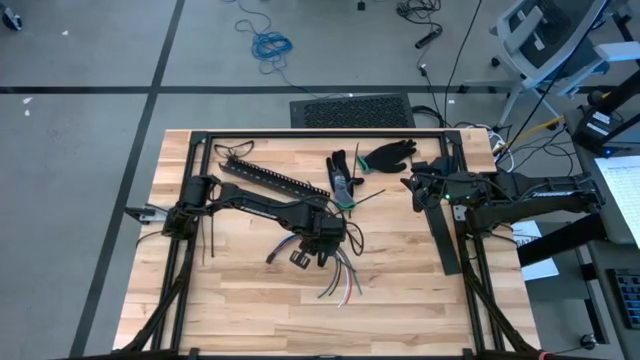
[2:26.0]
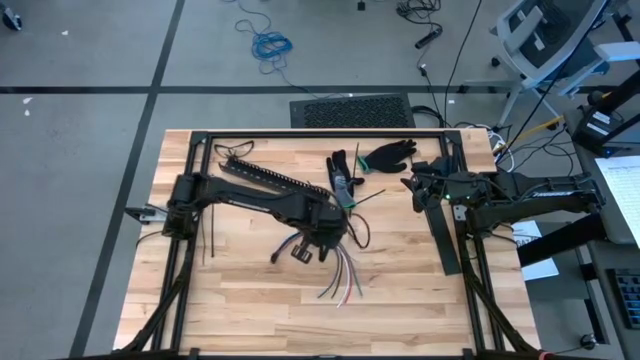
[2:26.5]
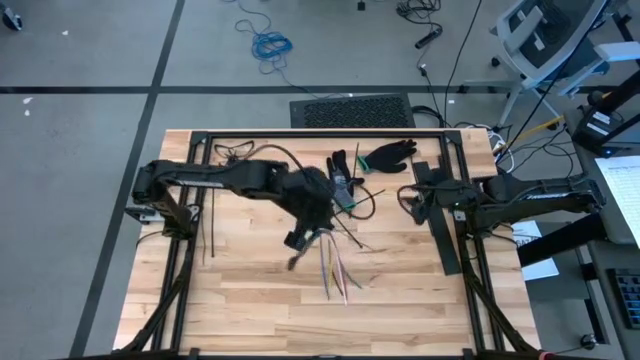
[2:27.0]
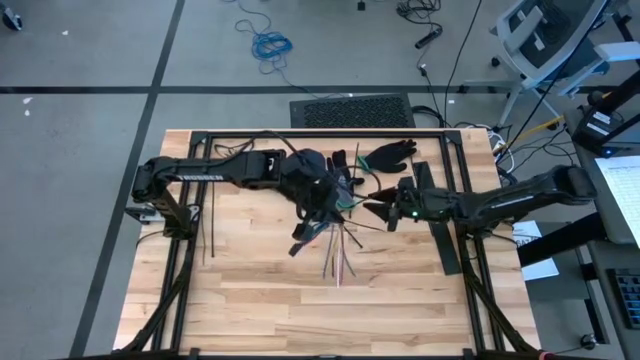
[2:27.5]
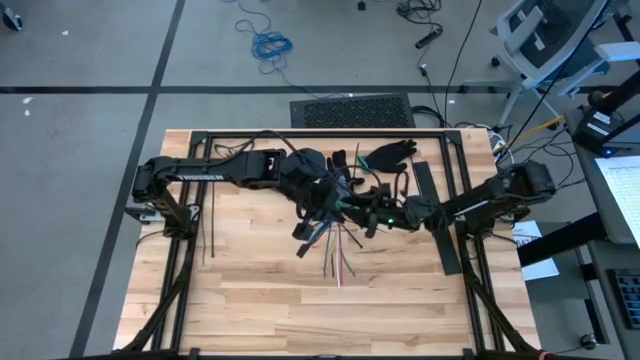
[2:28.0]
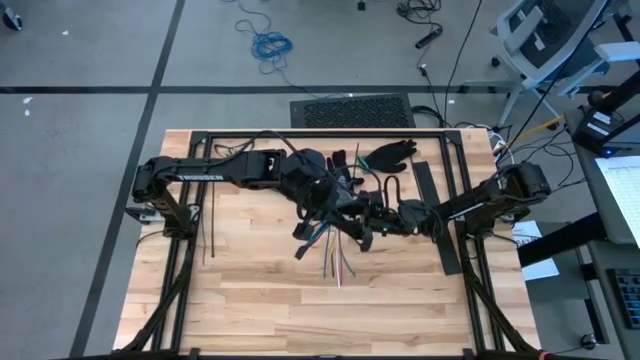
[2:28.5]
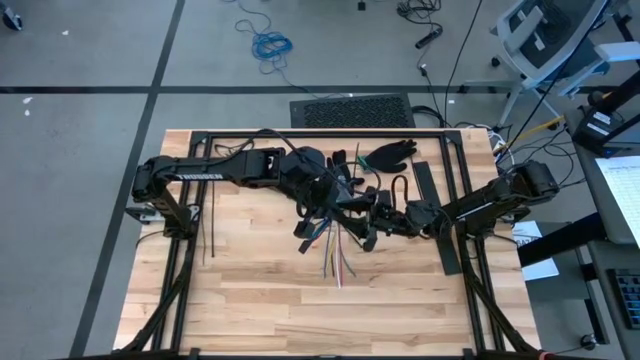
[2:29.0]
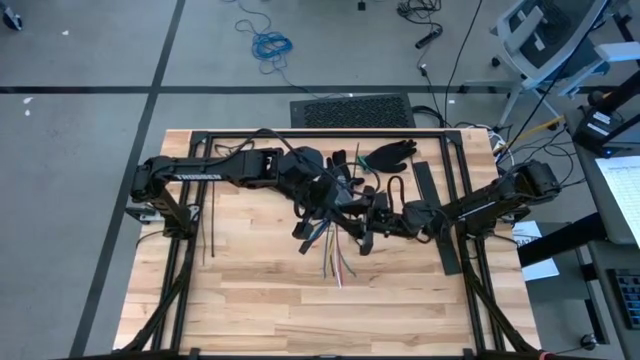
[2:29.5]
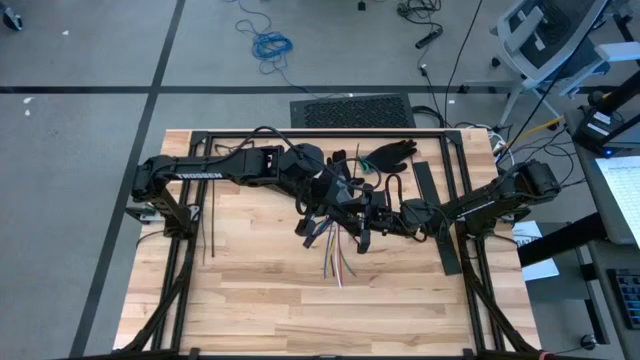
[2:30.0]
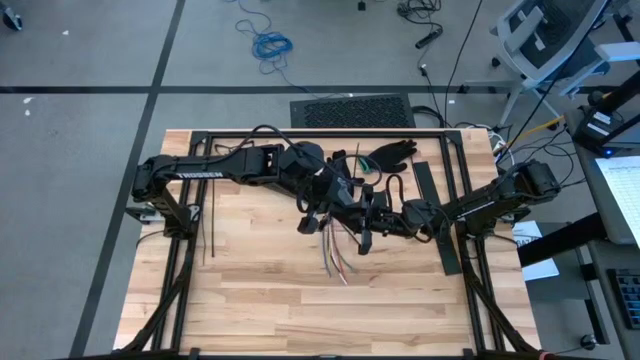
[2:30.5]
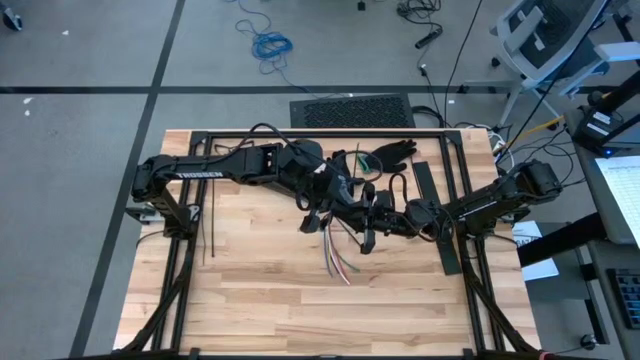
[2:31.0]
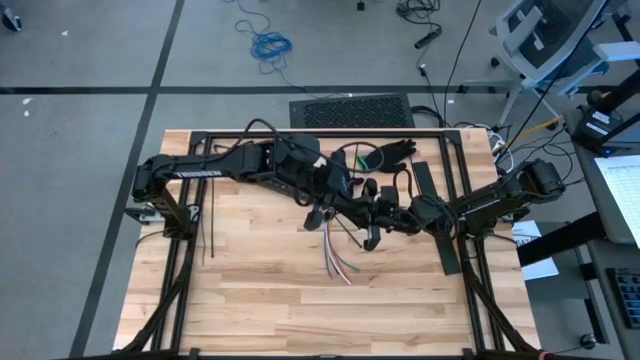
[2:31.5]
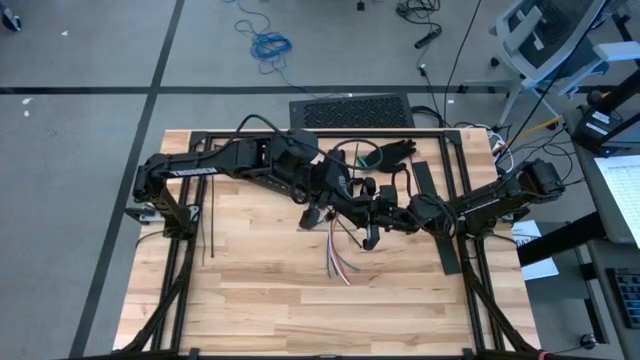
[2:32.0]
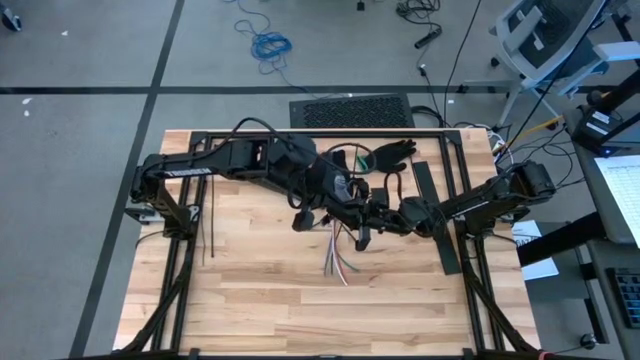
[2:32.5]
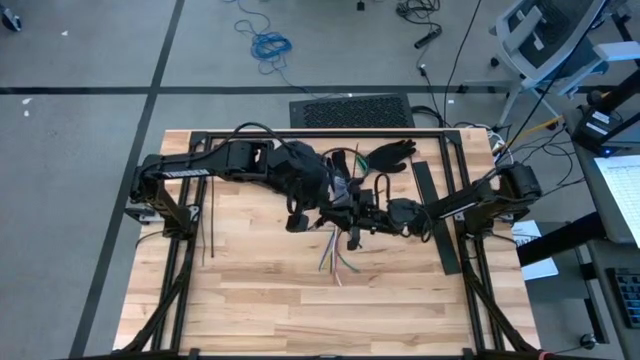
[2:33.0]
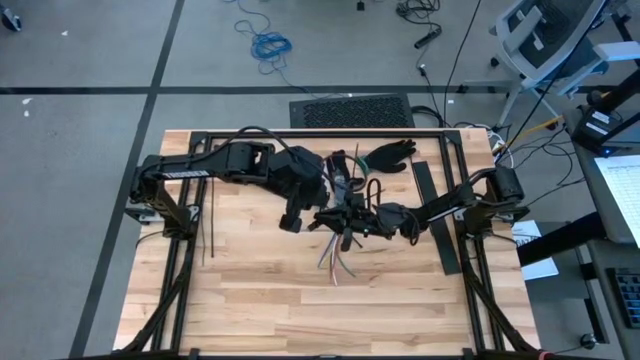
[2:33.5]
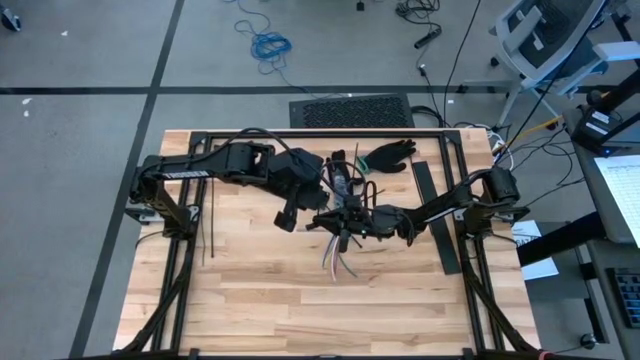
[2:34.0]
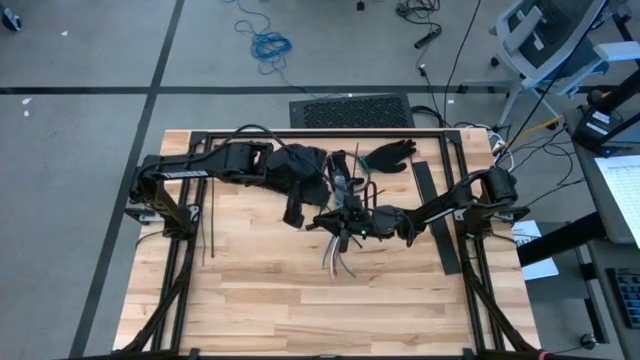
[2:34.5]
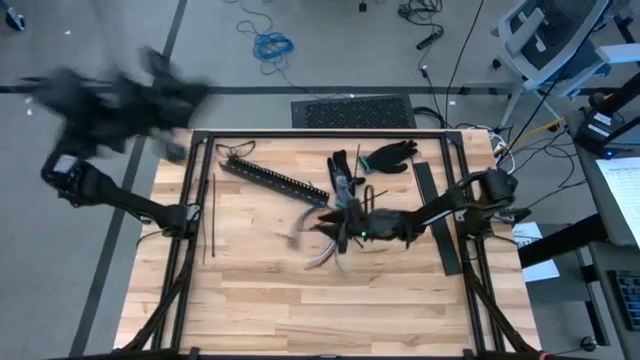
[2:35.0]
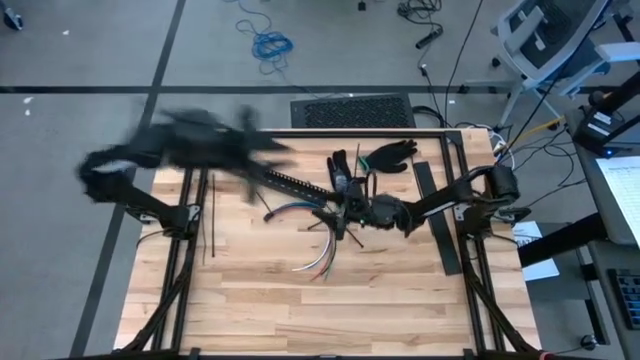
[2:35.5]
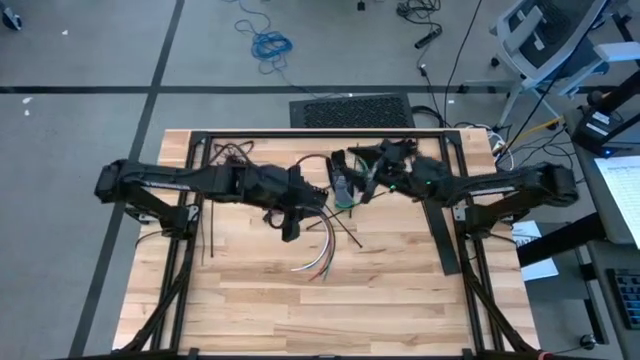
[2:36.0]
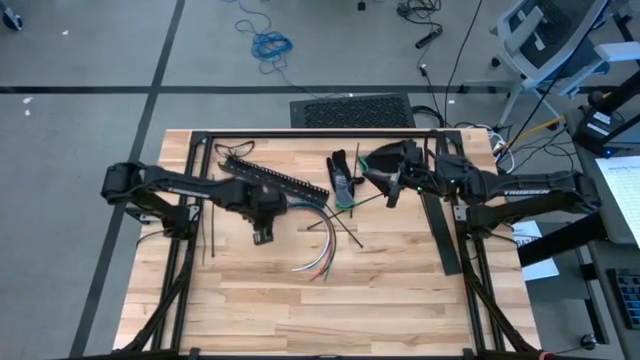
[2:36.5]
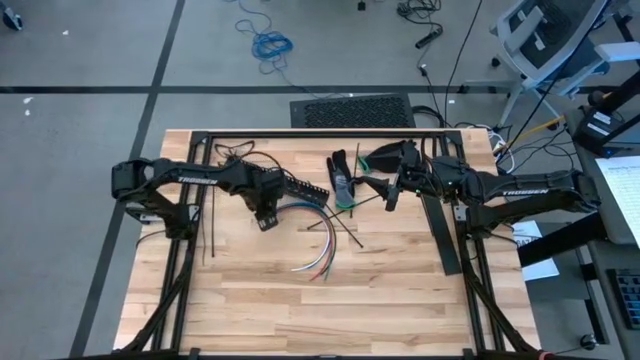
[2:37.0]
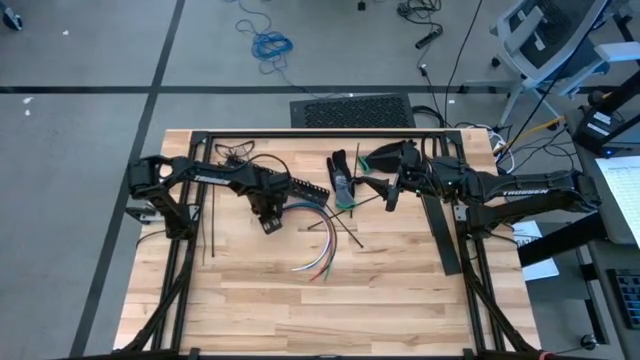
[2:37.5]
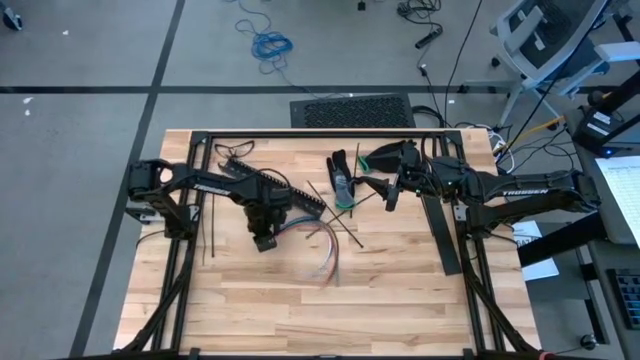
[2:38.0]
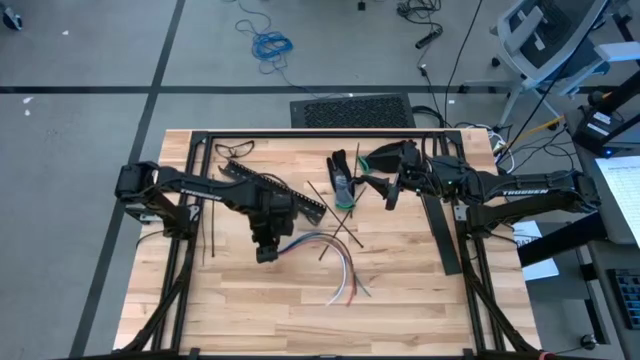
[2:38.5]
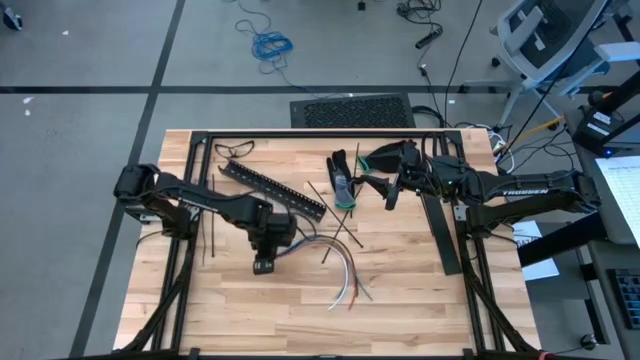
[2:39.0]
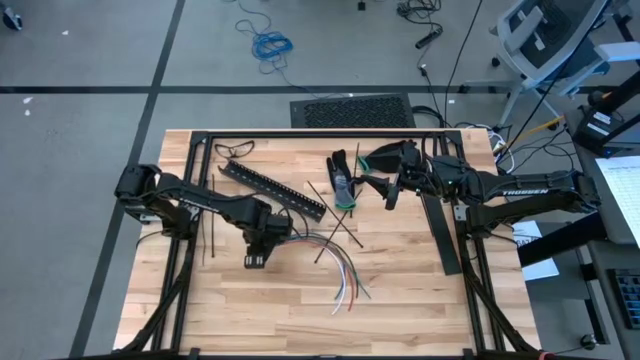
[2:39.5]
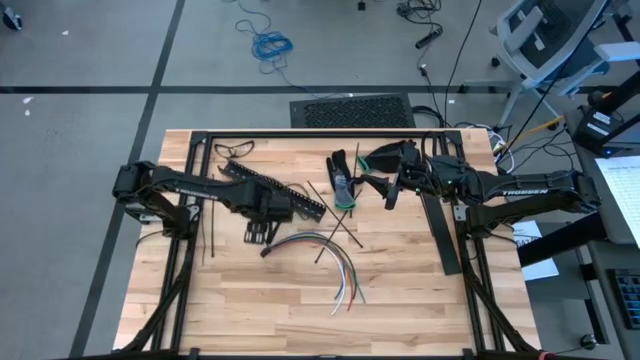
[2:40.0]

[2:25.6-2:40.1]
Task: Ziptie cables
Wrap the cable wires with the black zip tie

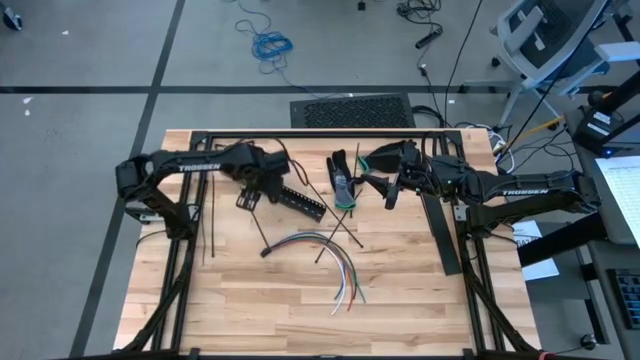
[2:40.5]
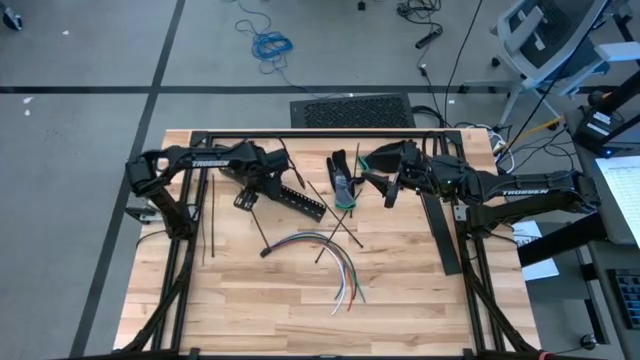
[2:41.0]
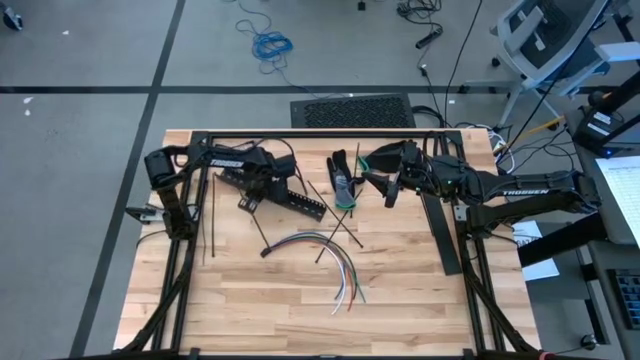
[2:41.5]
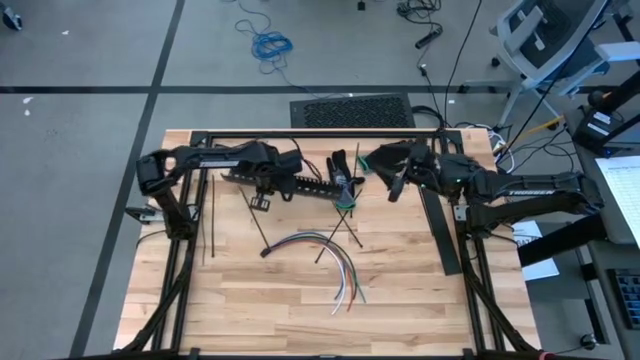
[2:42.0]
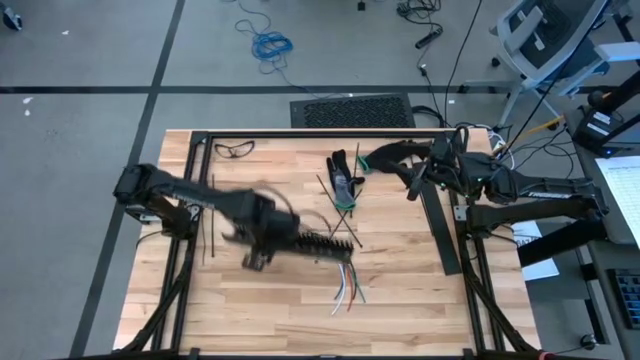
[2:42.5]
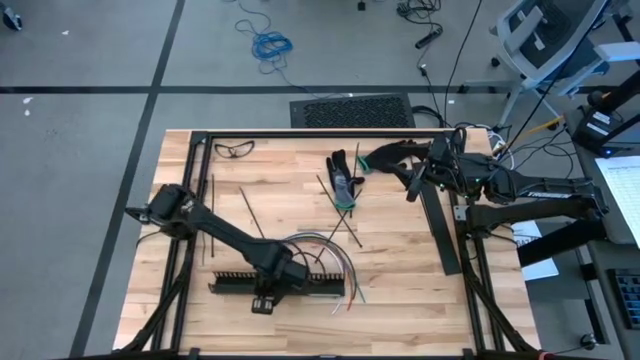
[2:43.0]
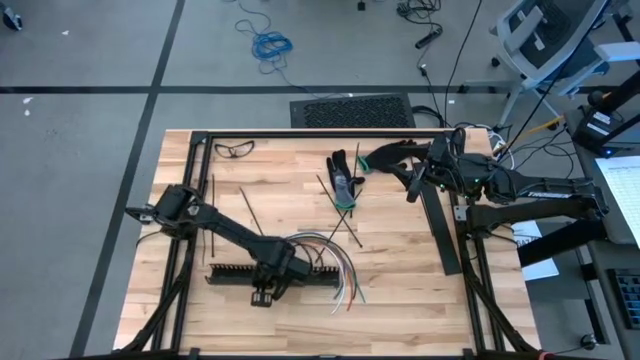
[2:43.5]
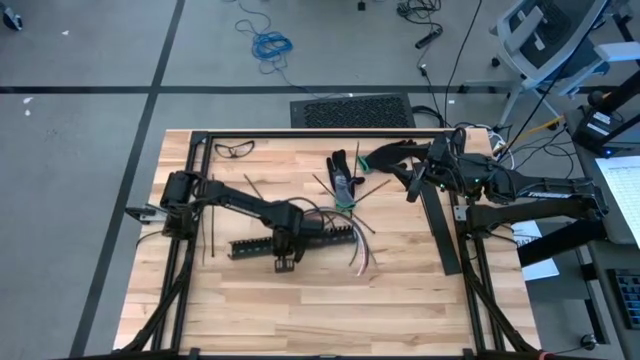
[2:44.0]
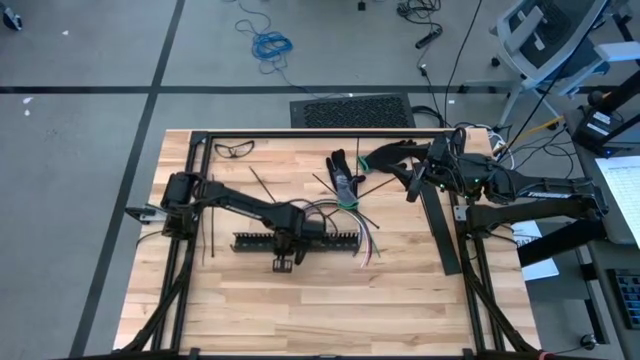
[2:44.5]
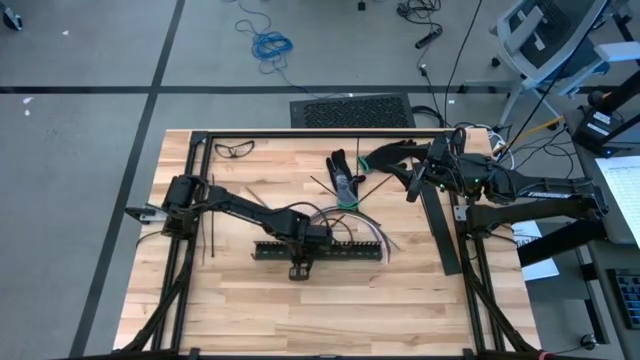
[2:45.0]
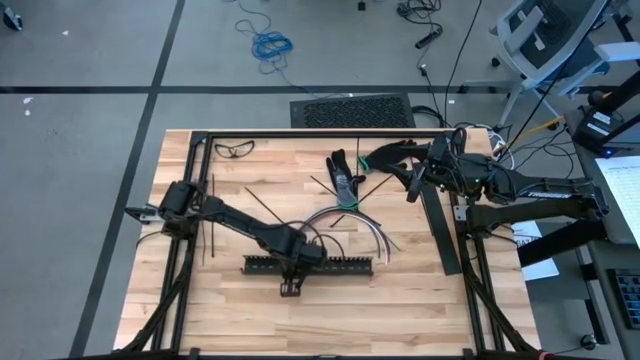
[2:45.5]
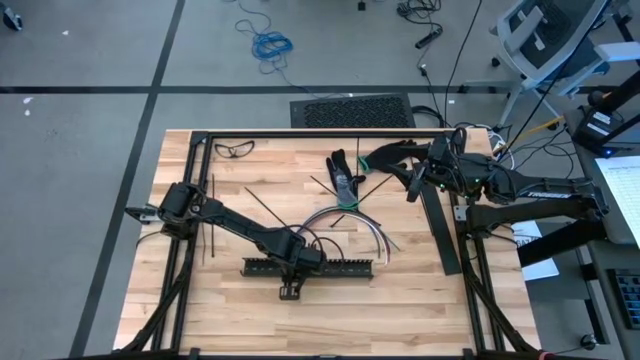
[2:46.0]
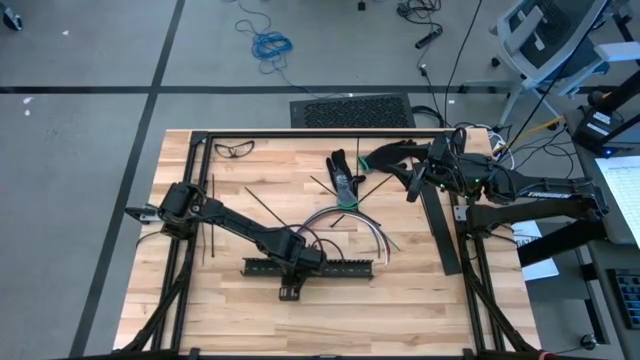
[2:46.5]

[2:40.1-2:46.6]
Prepare the black cable duct

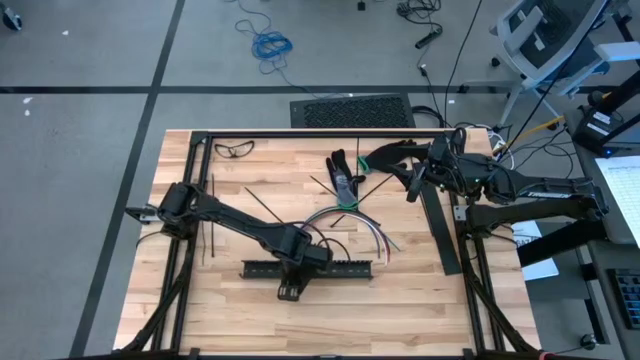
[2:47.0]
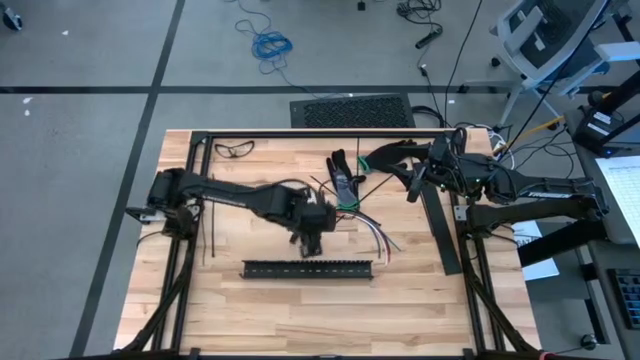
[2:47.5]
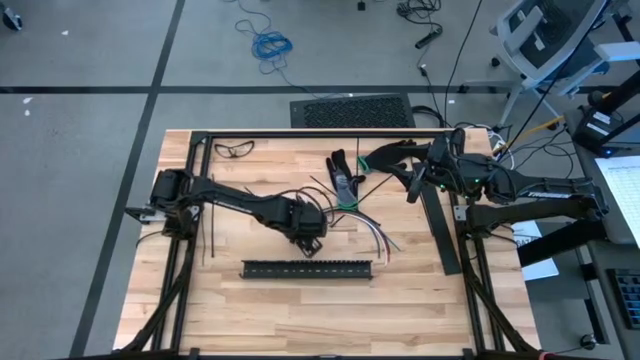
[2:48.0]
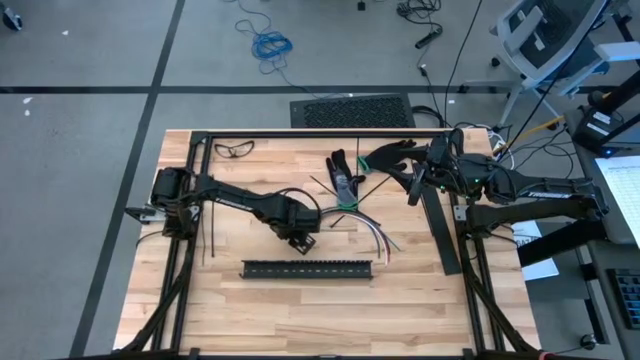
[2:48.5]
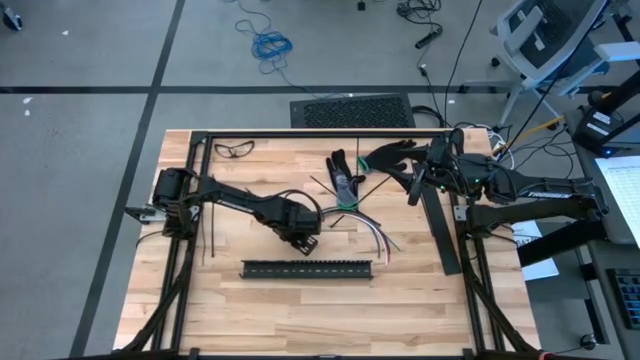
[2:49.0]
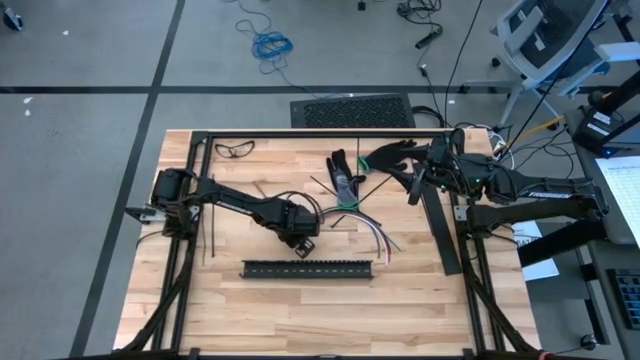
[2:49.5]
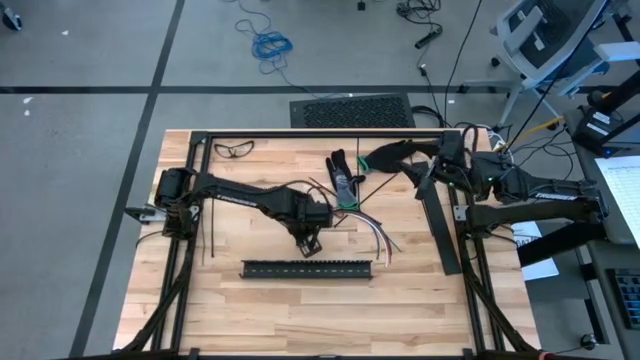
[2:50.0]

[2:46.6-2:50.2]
Put the zip tied cable wires into the black cable duct
